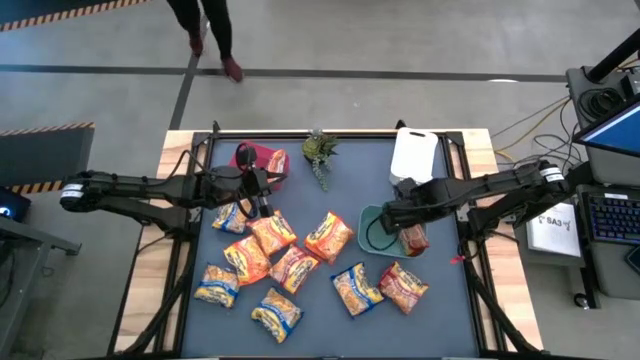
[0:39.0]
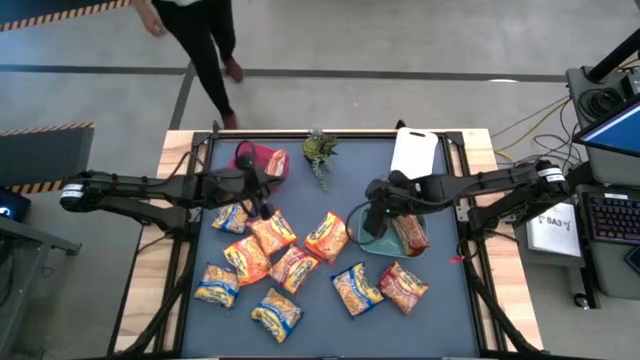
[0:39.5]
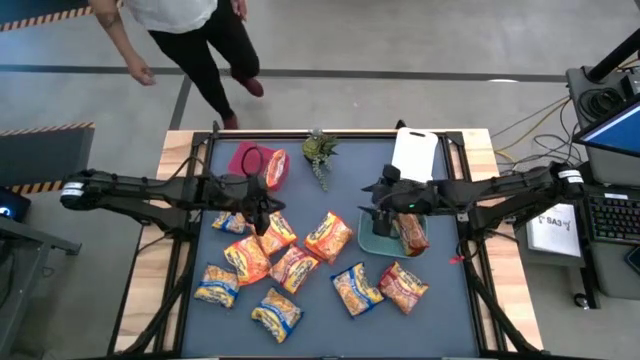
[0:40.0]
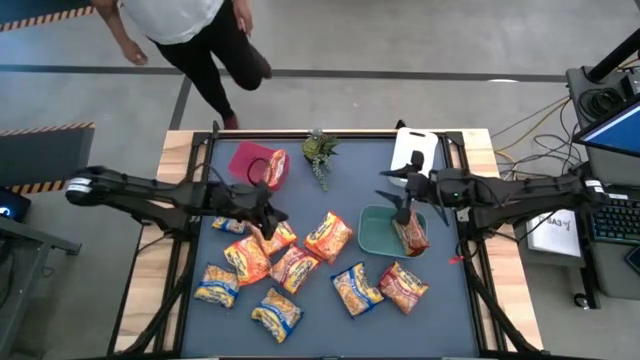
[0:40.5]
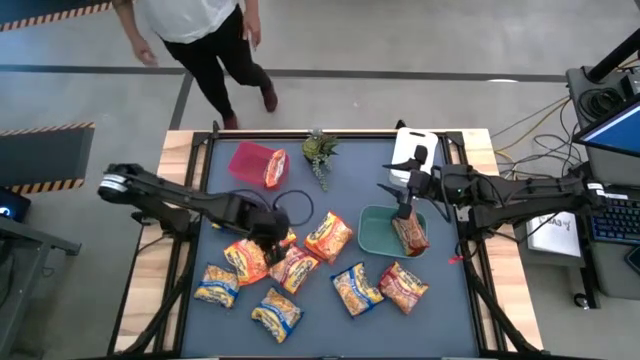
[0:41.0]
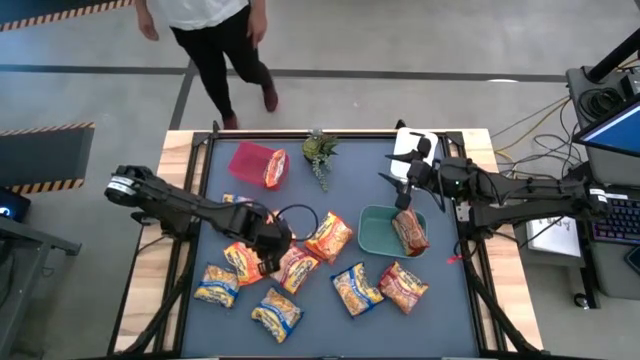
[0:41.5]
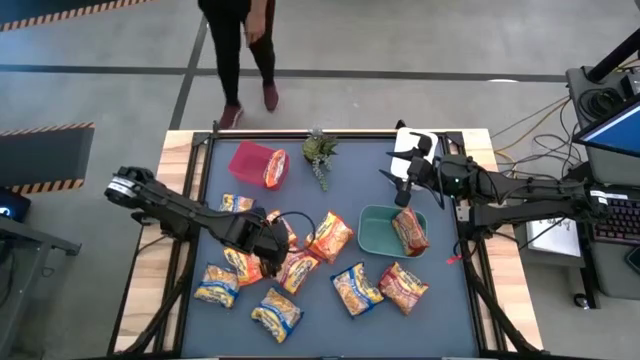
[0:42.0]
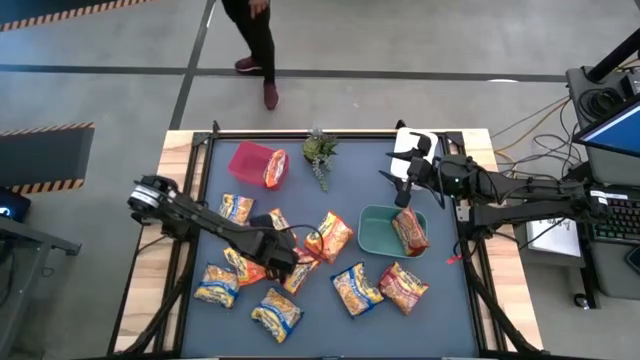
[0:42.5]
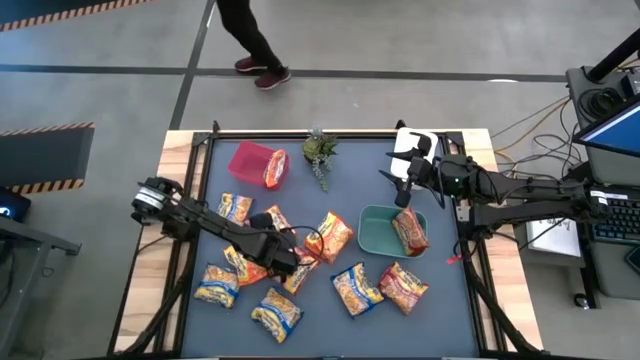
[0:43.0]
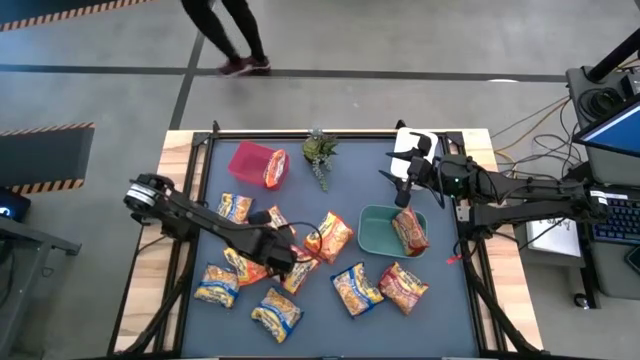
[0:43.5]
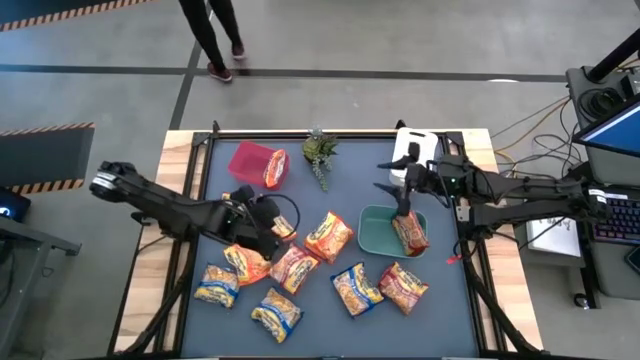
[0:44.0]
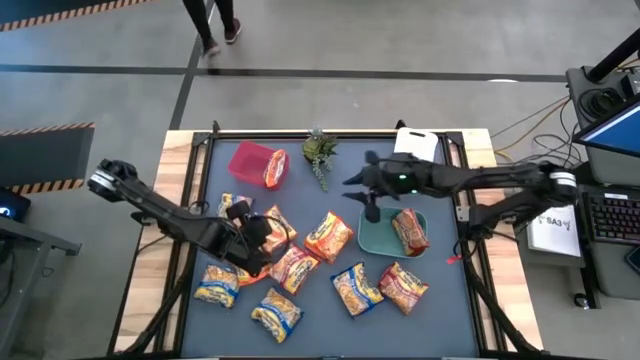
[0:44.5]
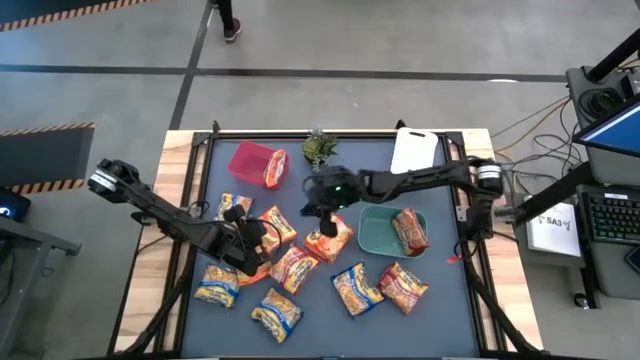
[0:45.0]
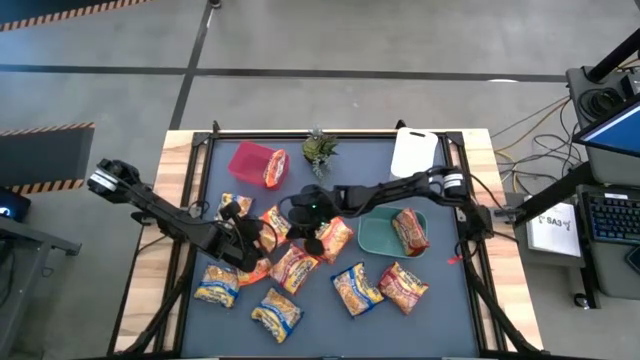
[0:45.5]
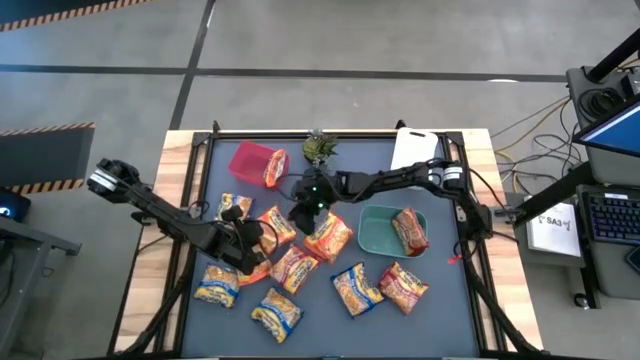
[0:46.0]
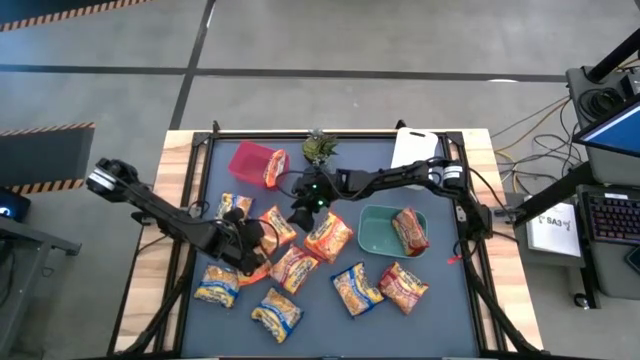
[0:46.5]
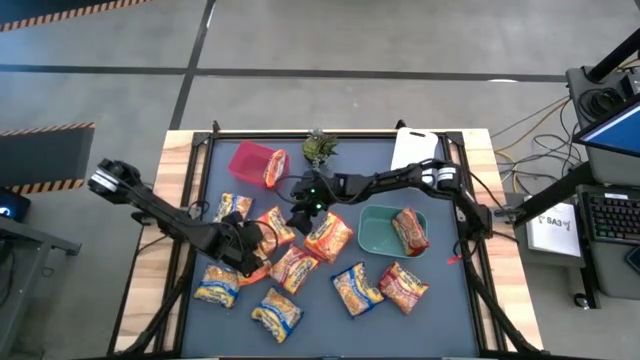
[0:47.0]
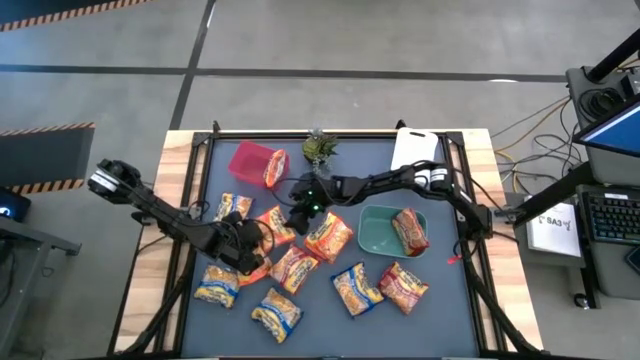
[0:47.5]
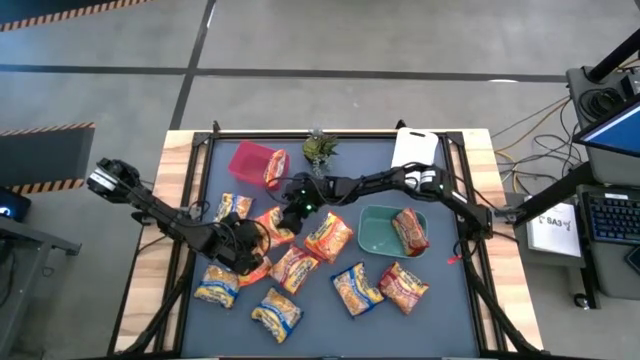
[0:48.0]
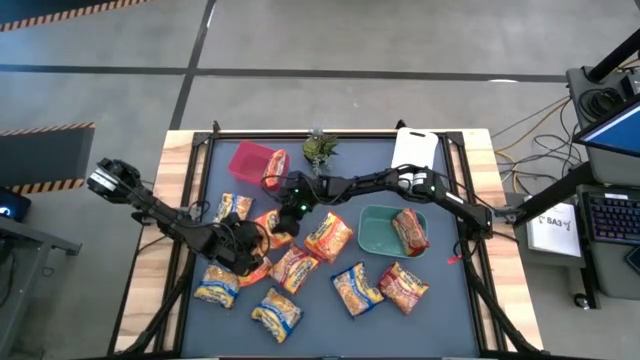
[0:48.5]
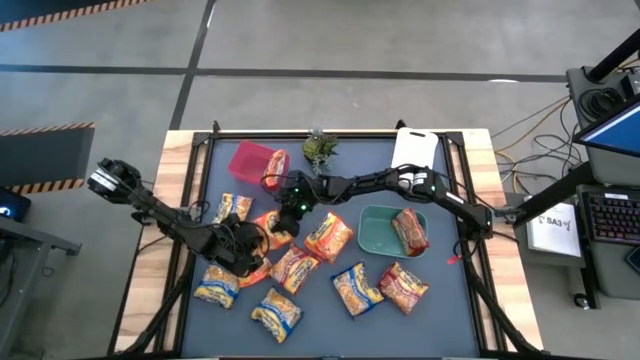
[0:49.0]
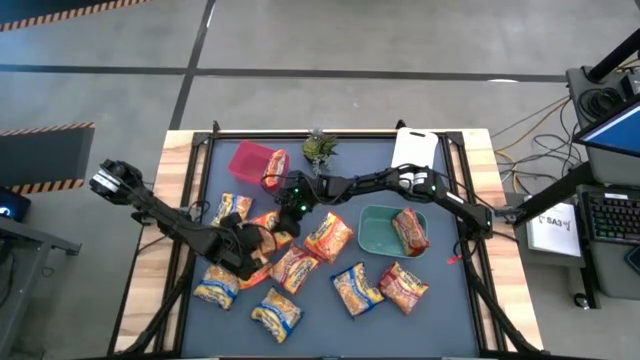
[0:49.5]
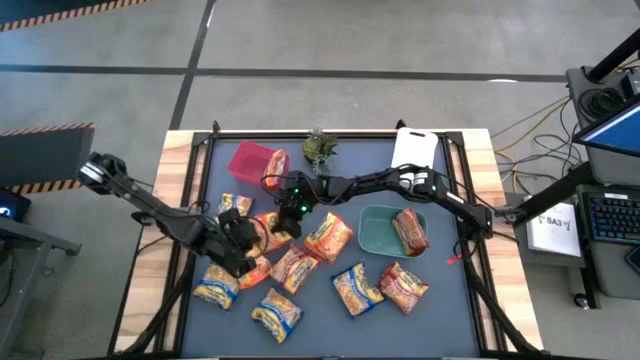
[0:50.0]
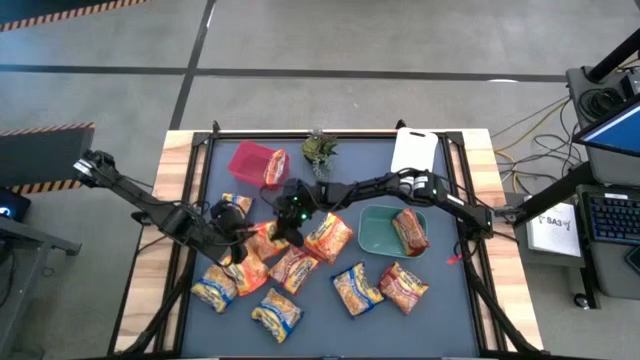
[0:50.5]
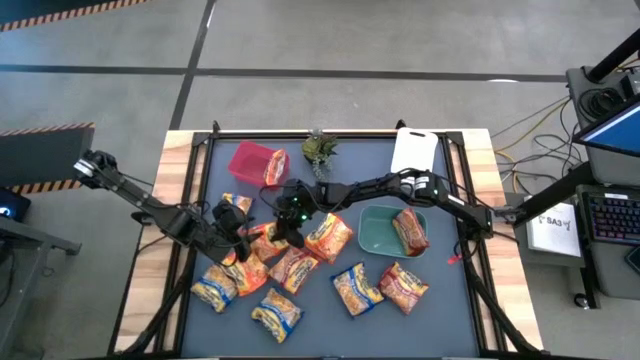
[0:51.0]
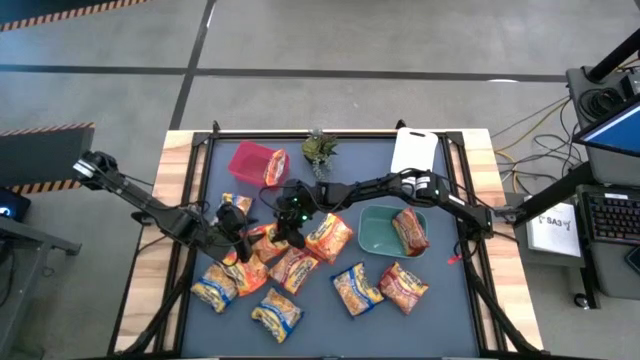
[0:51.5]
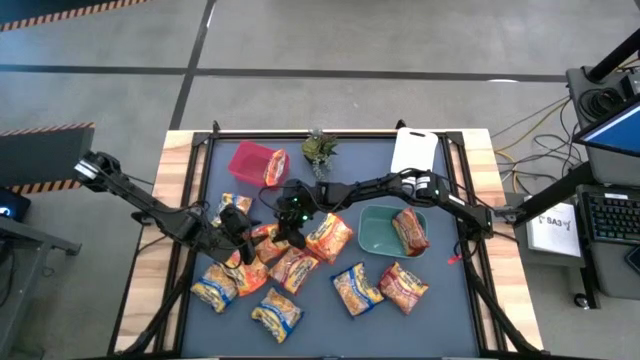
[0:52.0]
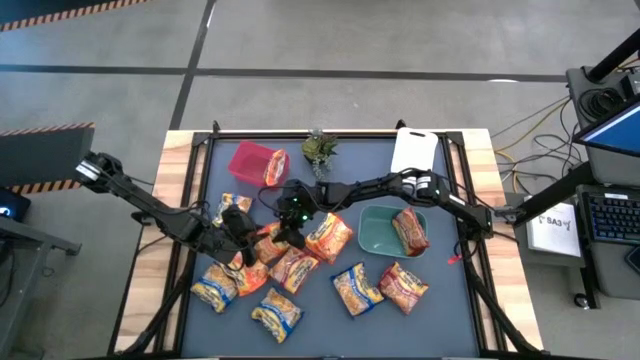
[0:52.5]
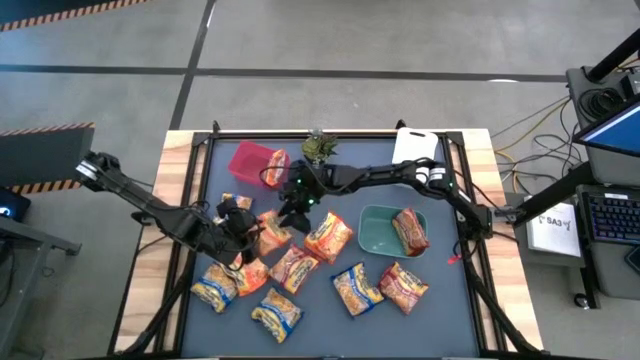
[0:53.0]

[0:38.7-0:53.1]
Task: Sort Maruchan noodles
Put the orange noodle pack into the red bin

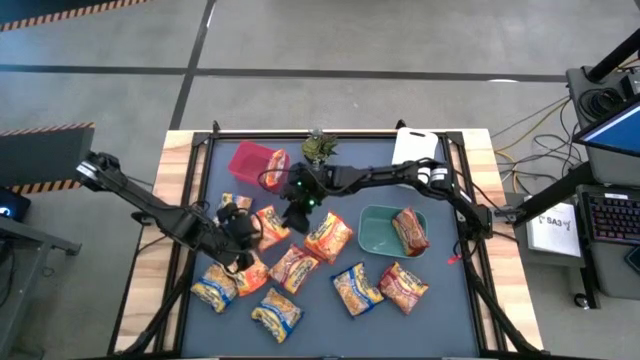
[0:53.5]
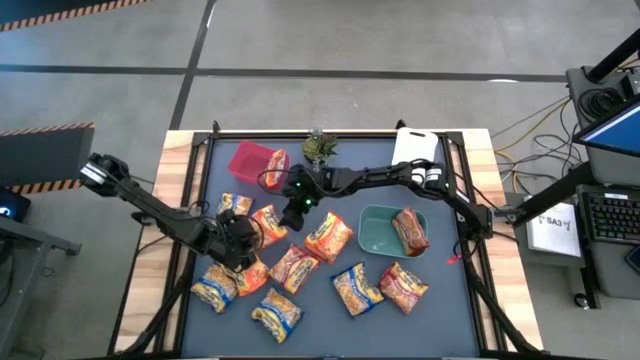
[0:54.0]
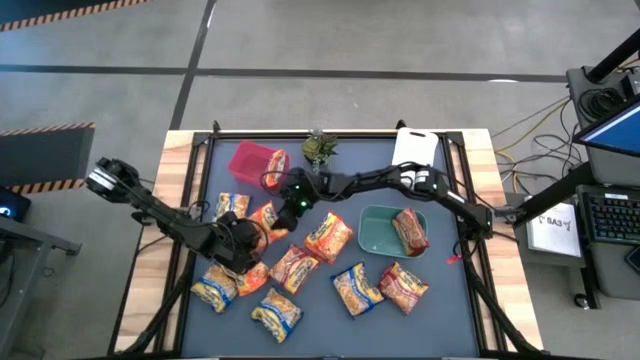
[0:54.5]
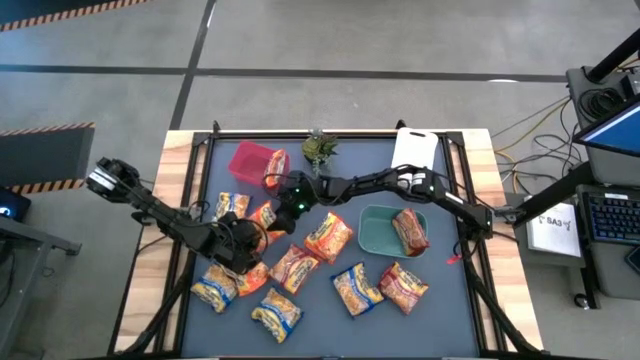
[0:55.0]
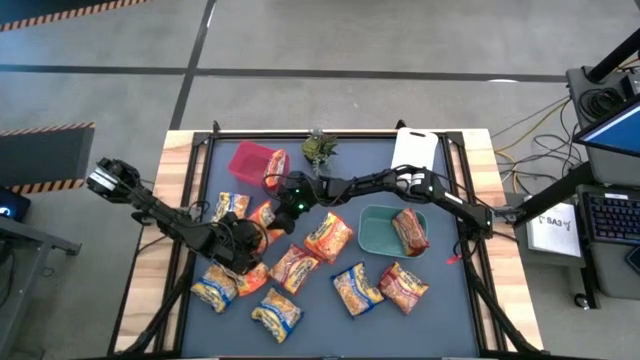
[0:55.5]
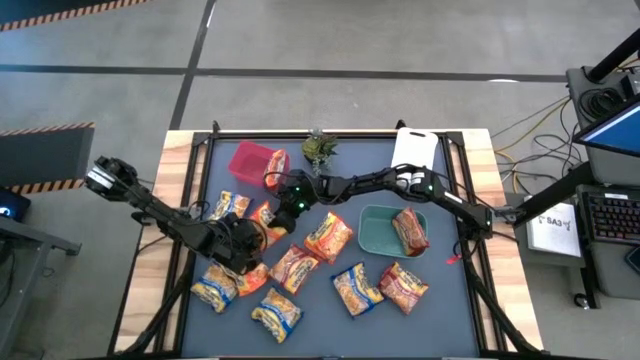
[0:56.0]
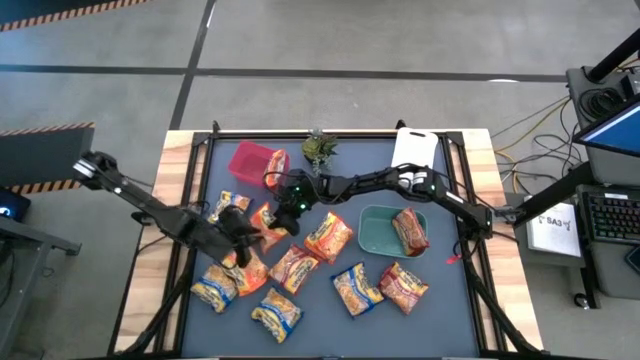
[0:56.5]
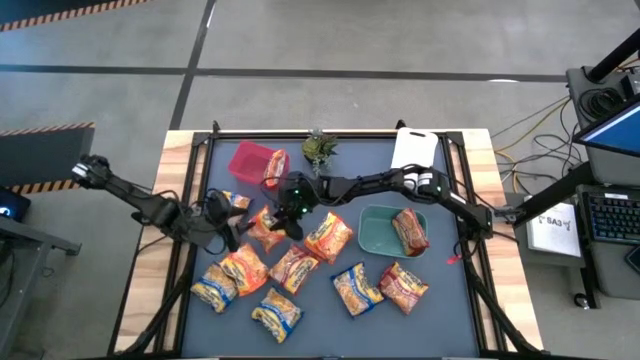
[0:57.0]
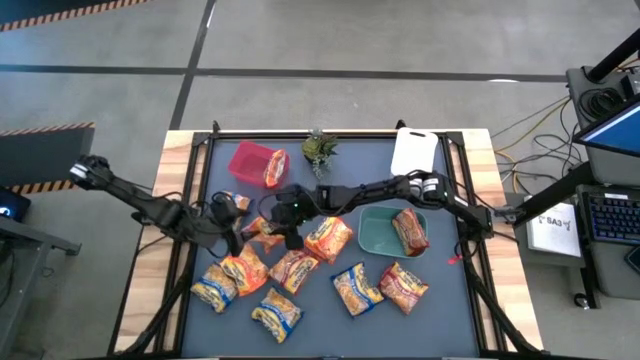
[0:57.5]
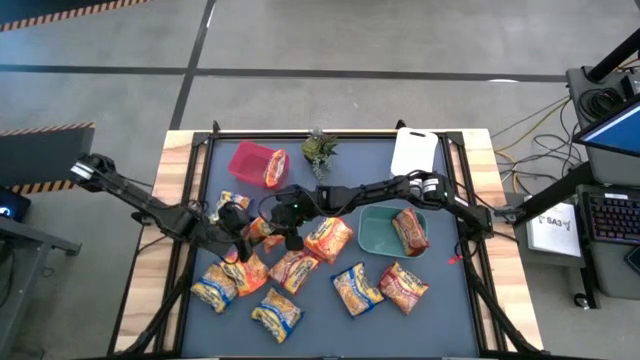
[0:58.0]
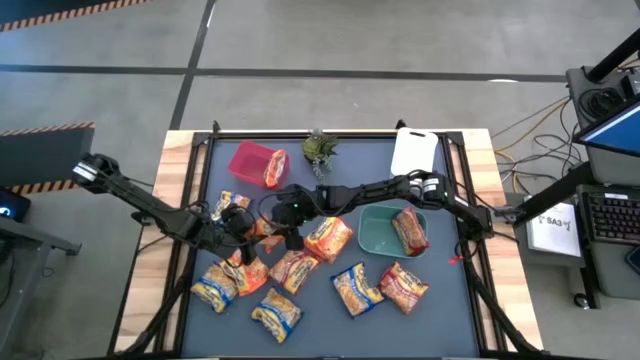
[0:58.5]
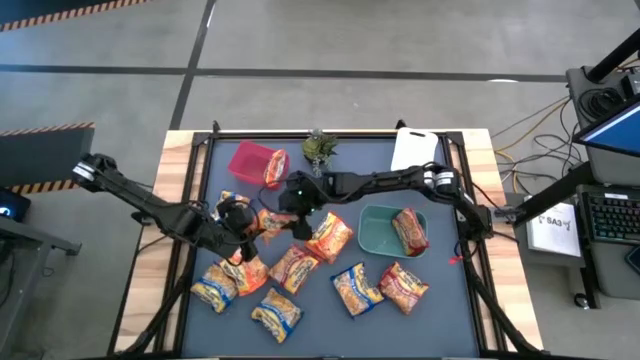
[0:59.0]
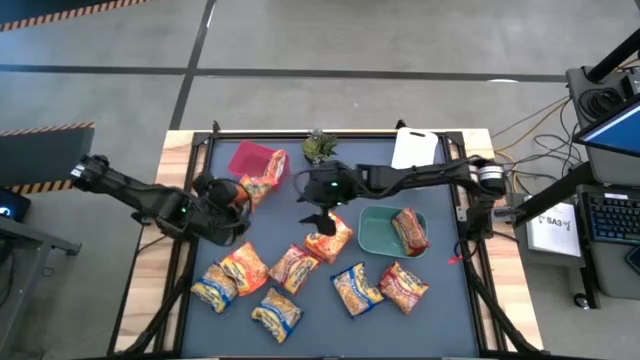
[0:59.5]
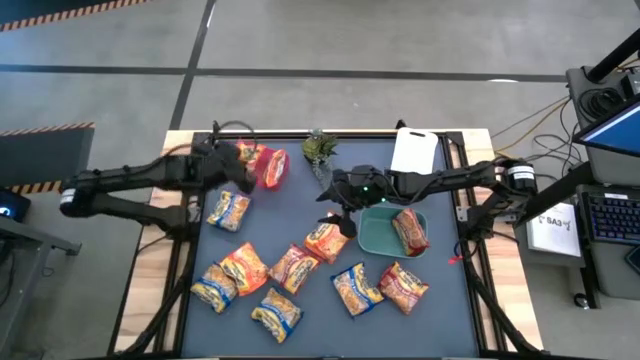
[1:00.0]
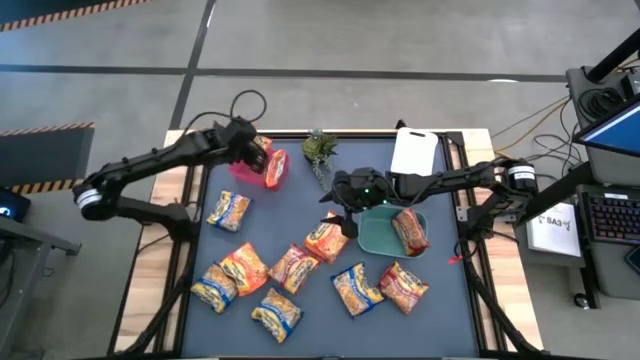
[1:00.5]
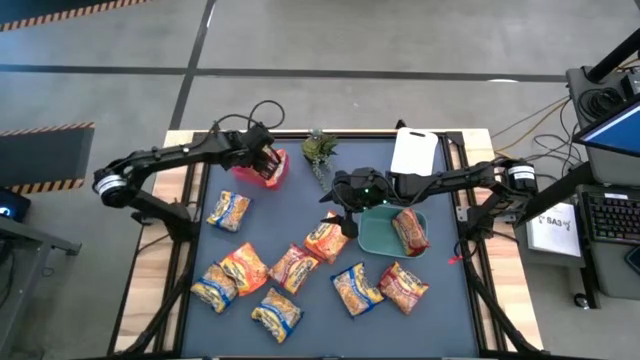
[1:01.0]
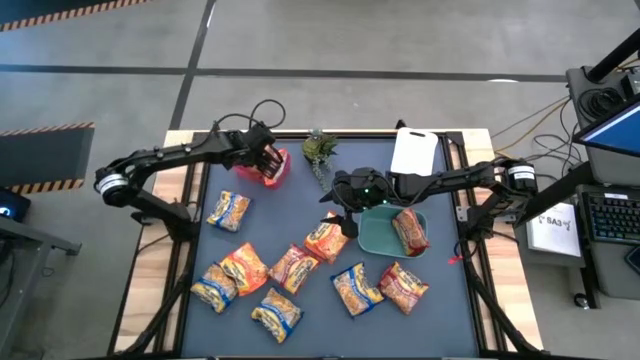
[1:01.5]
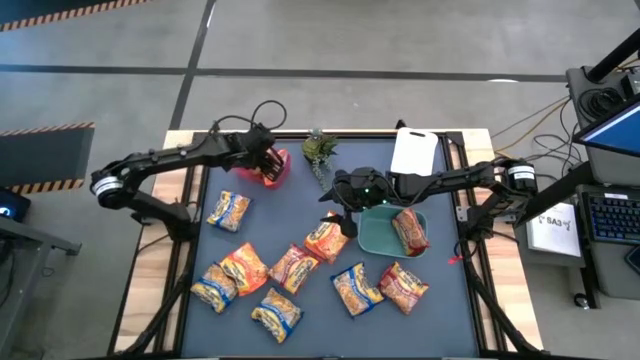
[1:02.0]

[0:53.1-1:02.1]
Put the orange noodle pack into the red bin
